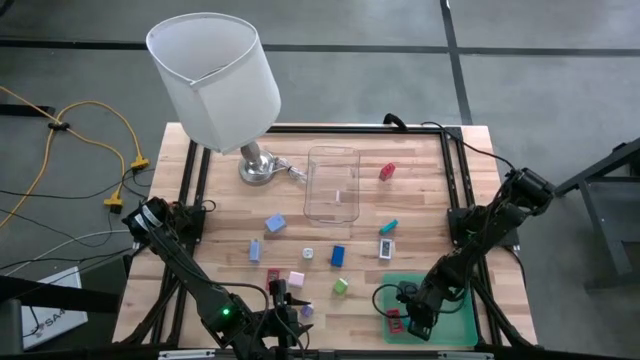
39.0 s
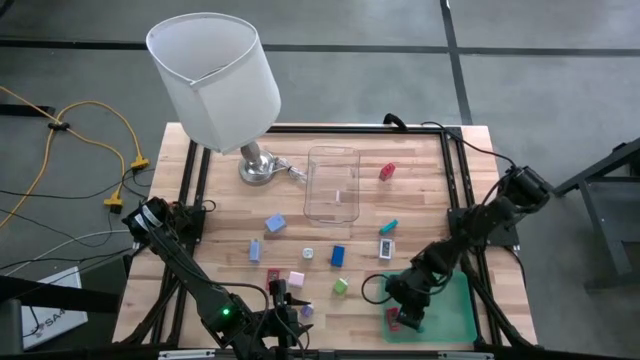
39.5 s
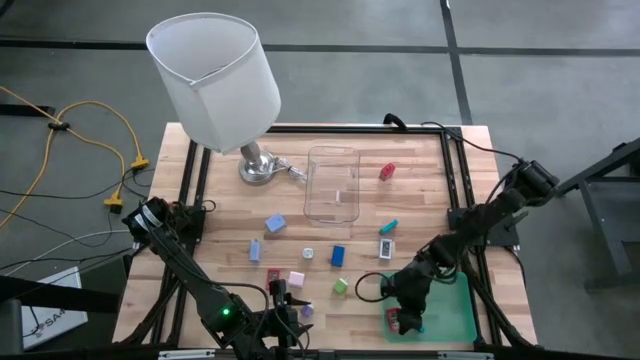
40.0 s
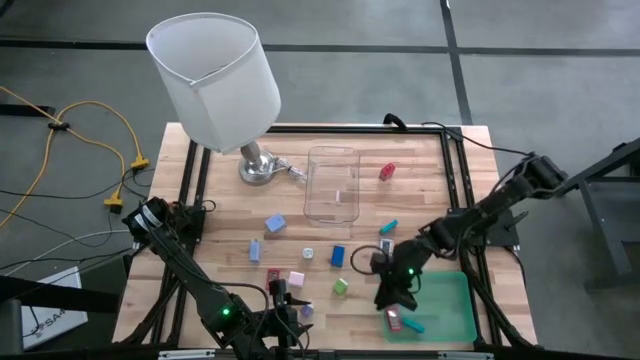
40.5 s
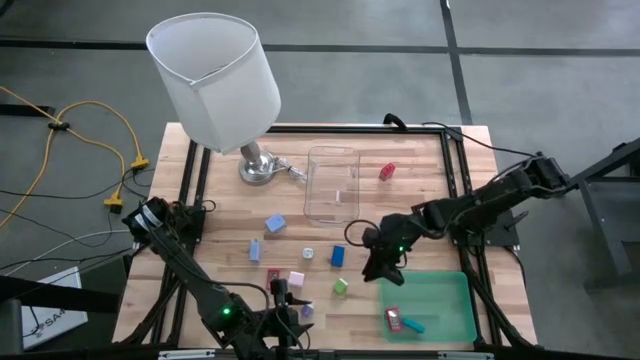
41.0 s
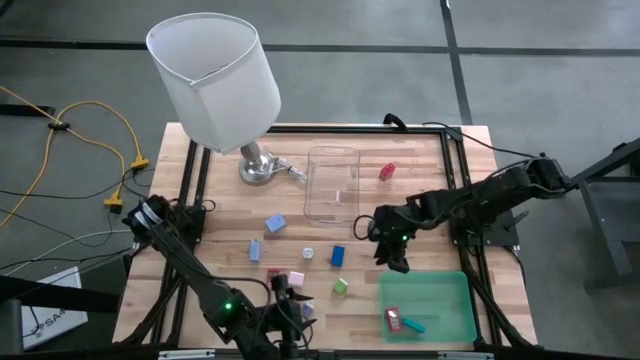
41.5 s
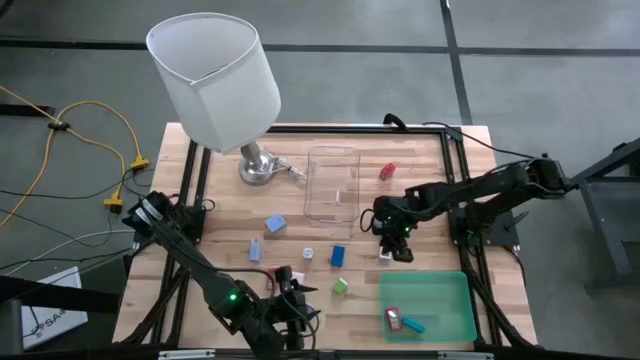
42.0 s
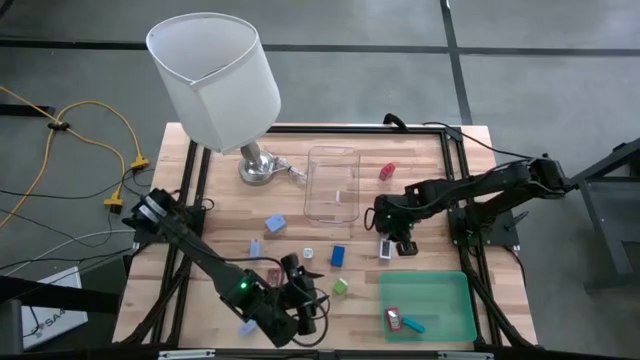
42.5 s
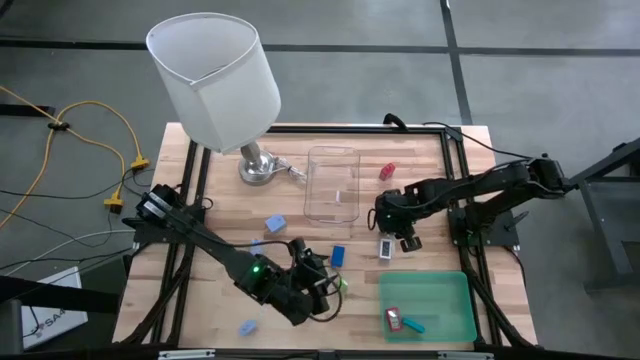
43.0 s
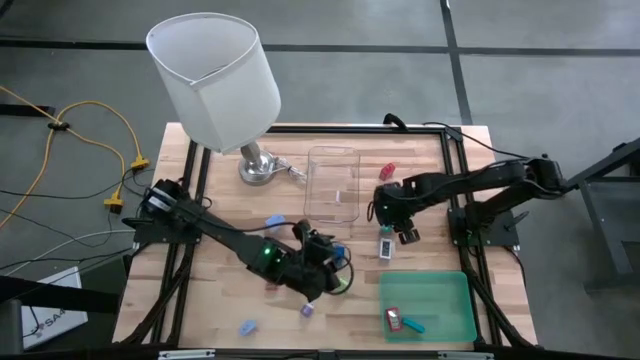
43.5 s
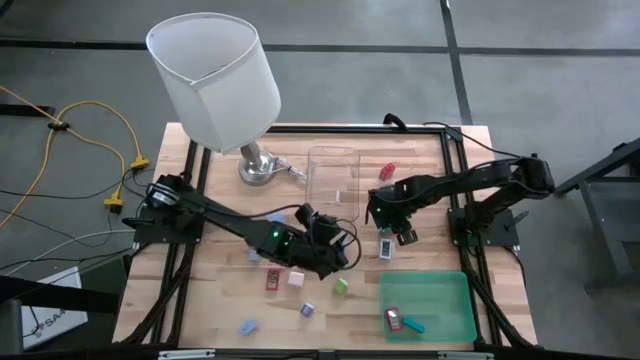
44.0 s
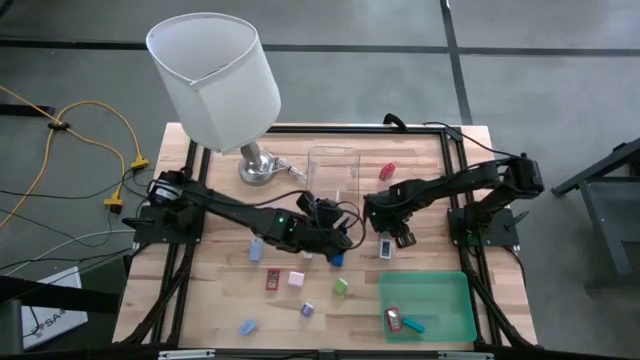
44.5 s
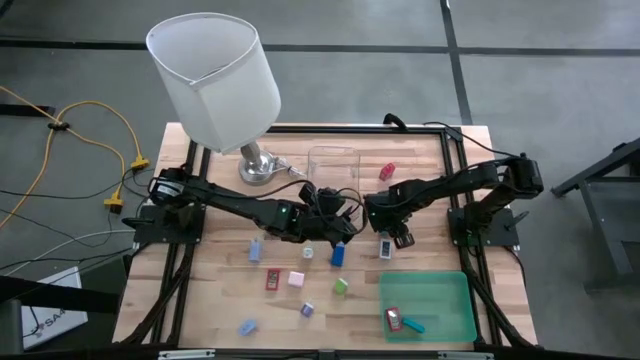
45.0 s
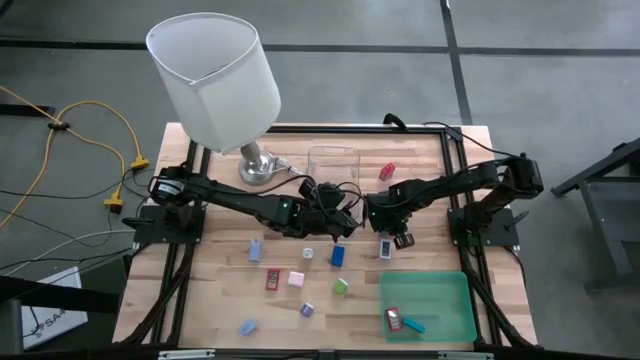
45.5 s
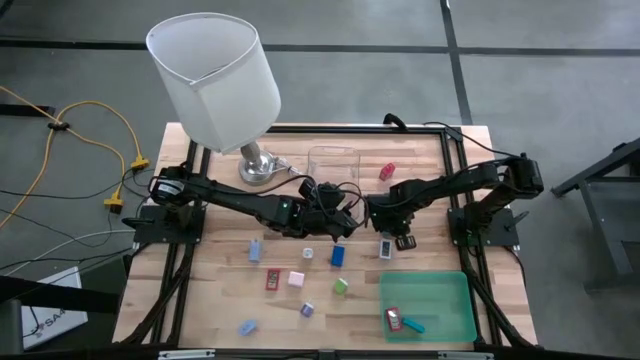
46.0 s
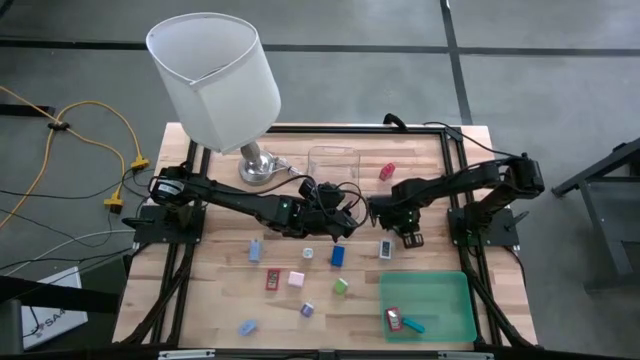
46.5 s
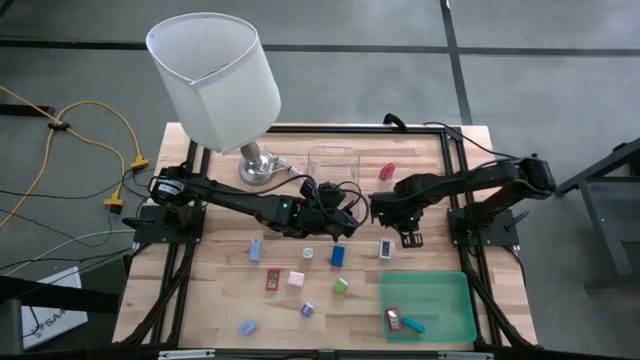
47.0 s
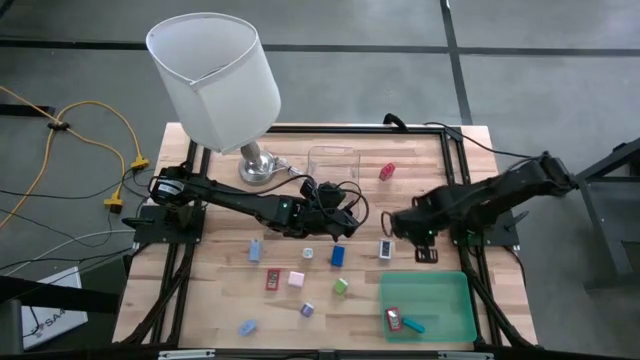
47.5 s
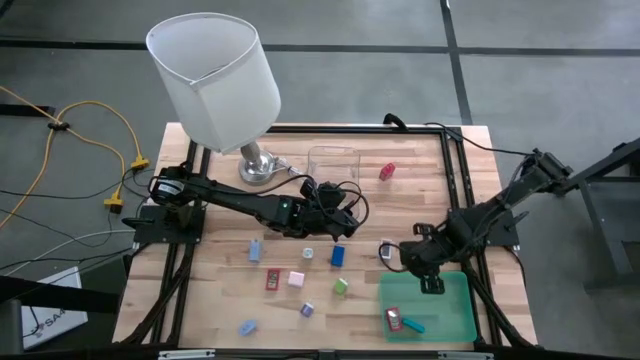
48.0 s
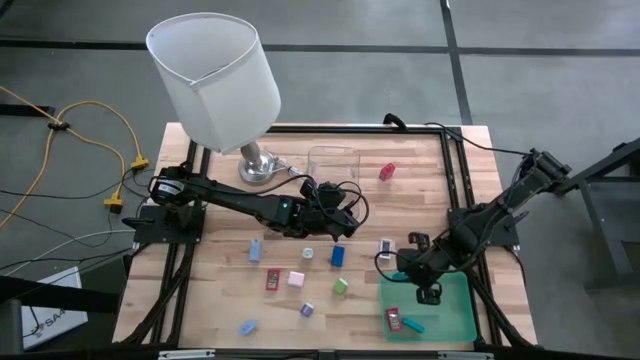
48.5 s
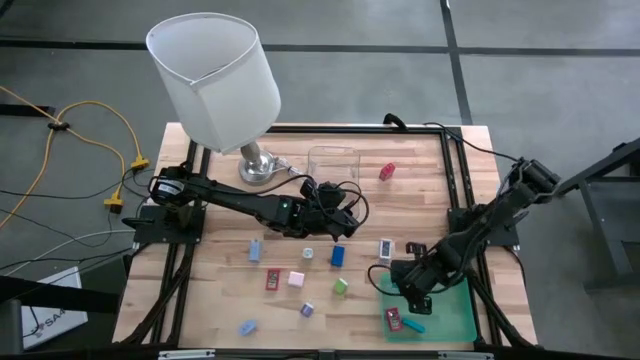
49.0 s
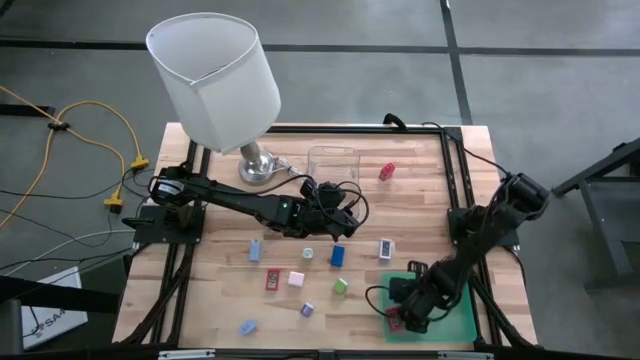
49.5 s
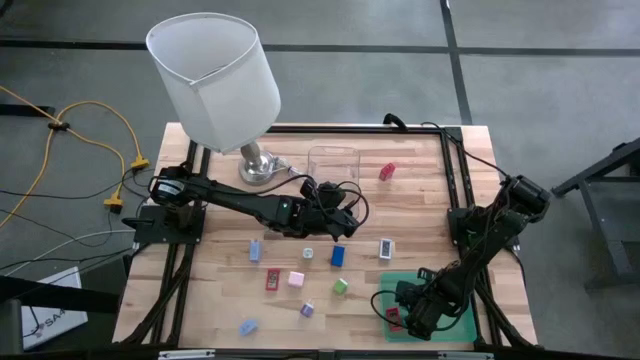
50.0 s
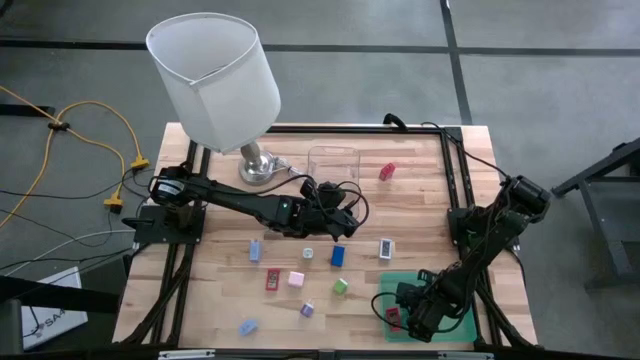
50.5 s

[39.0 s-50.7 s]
Task: Pick & Place Office items
Put the light blue digital clock into the green bin
